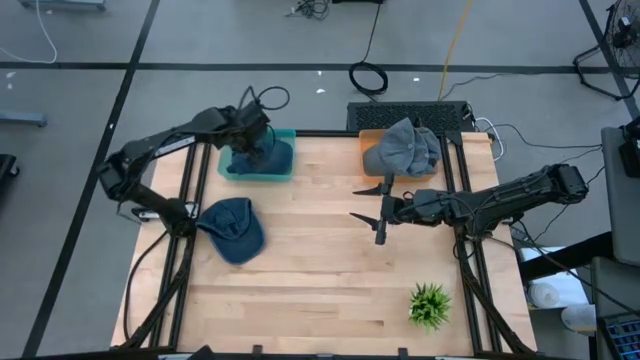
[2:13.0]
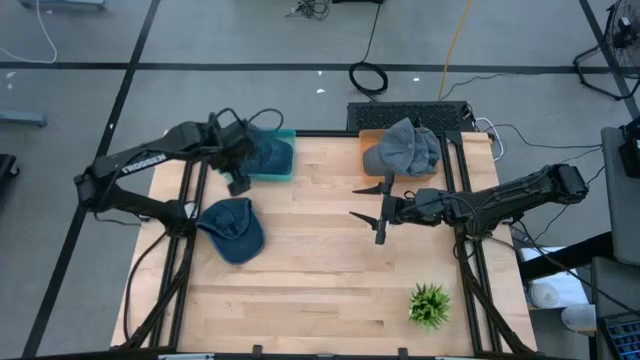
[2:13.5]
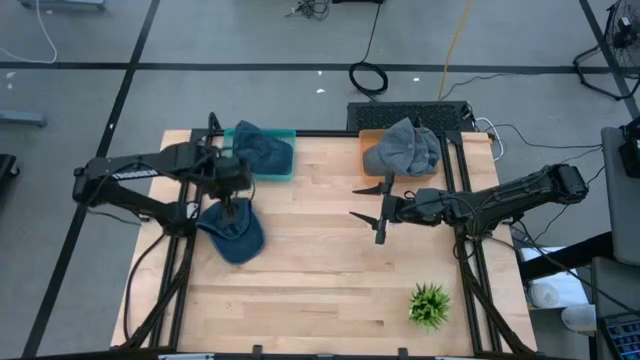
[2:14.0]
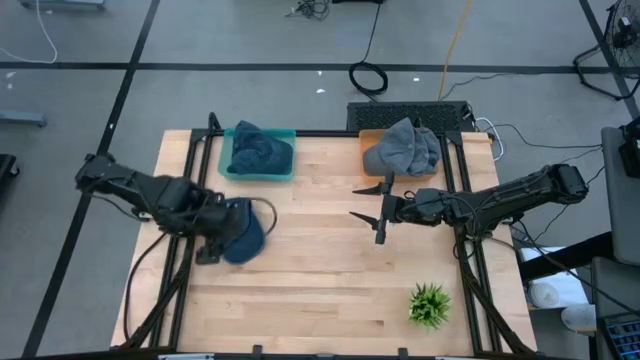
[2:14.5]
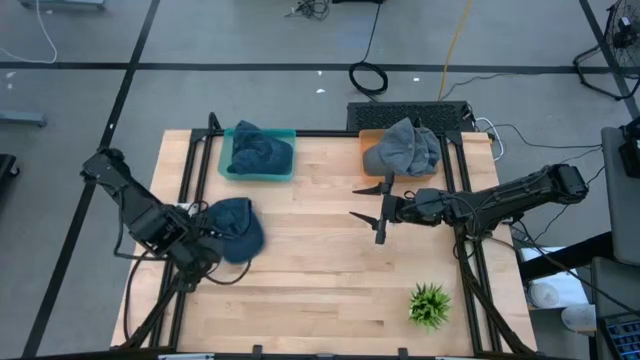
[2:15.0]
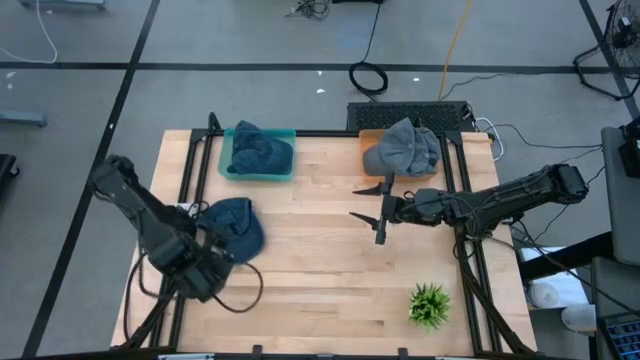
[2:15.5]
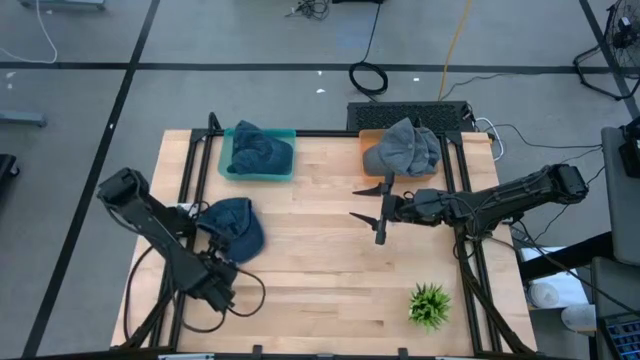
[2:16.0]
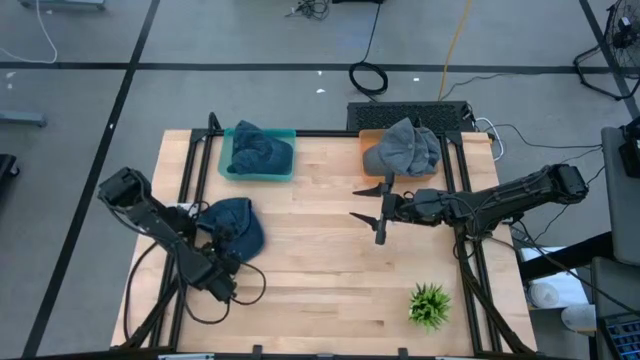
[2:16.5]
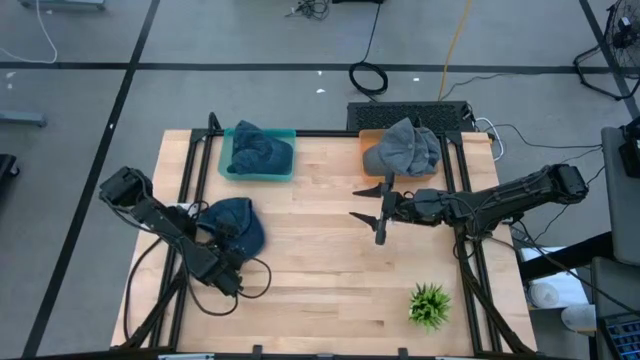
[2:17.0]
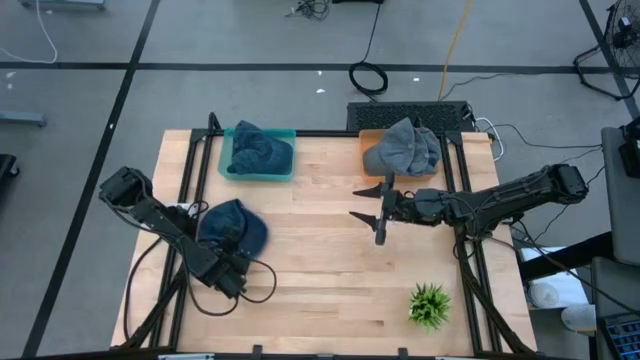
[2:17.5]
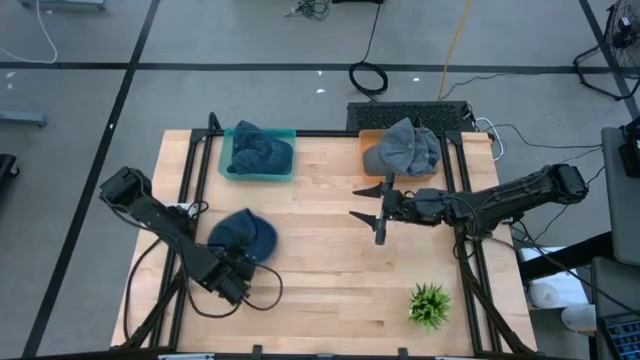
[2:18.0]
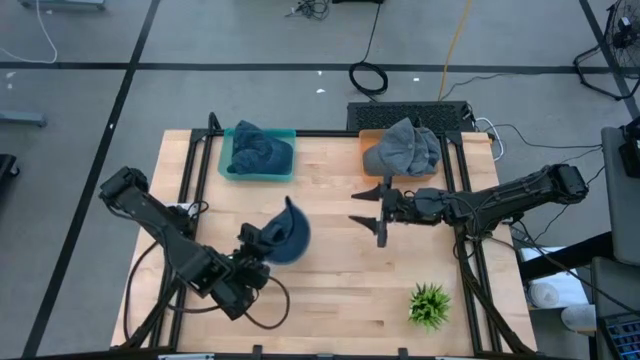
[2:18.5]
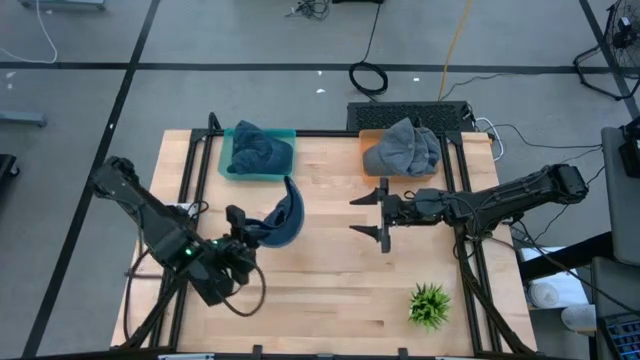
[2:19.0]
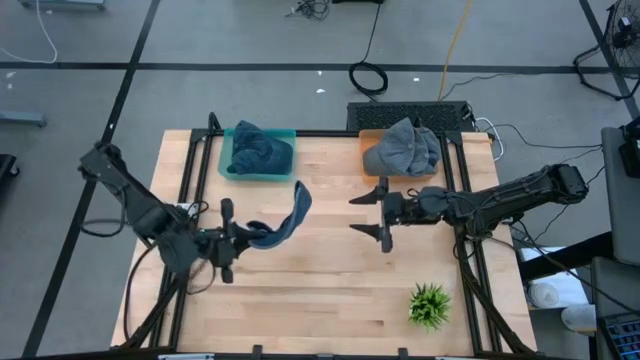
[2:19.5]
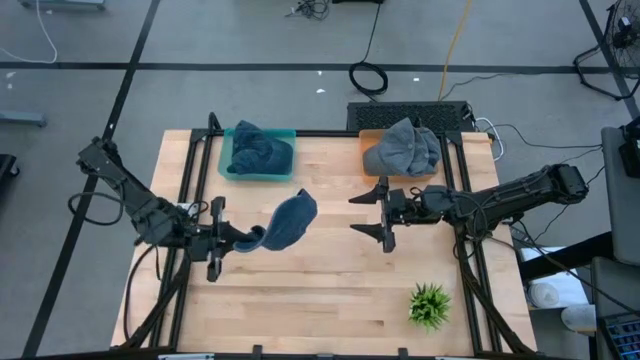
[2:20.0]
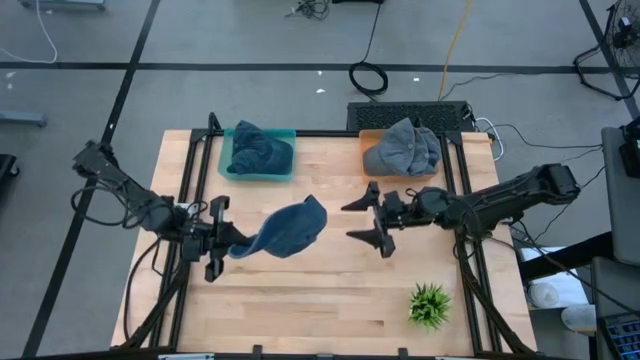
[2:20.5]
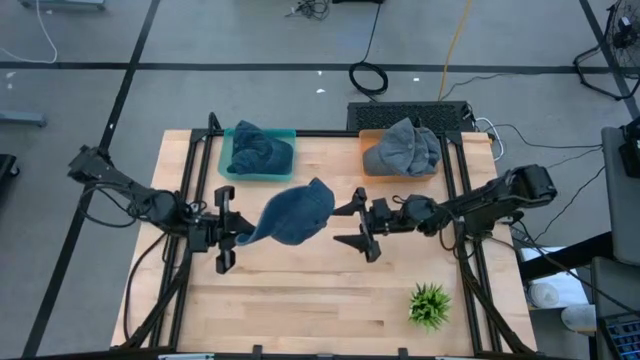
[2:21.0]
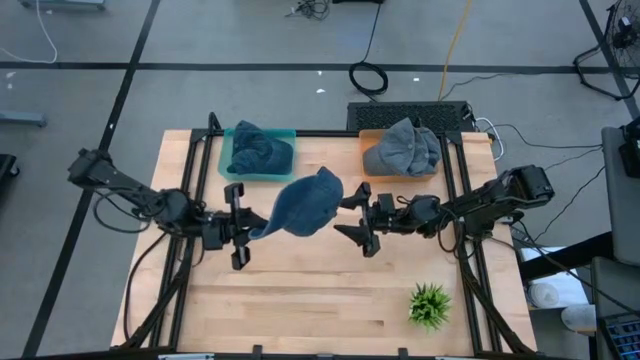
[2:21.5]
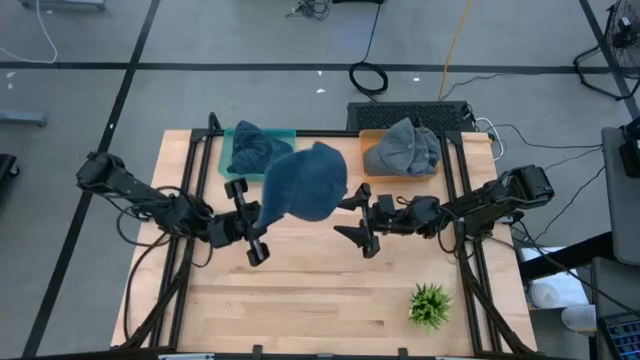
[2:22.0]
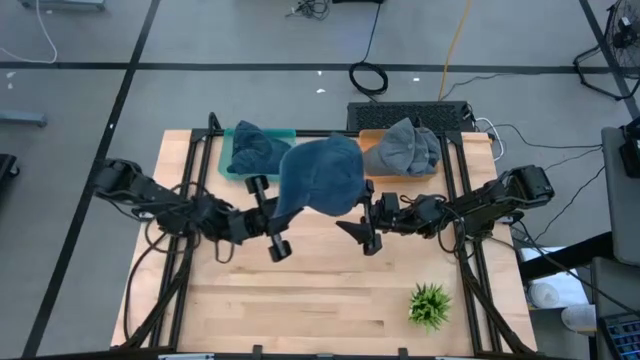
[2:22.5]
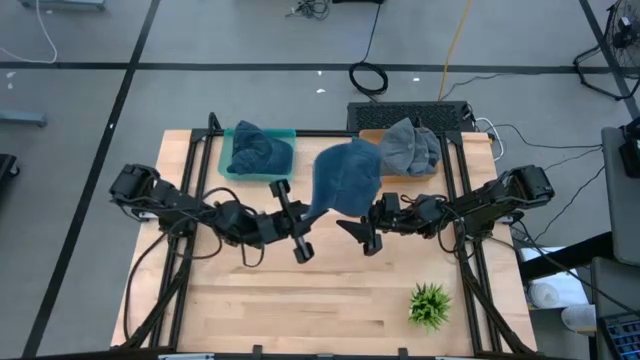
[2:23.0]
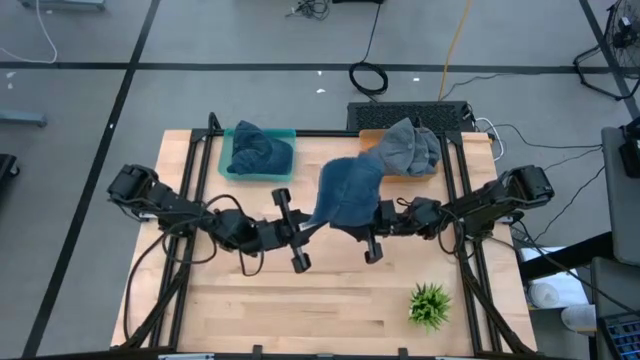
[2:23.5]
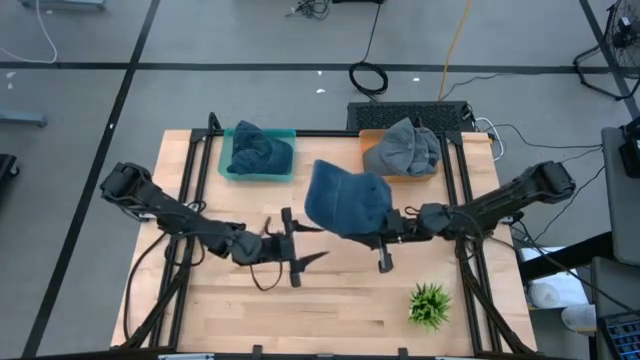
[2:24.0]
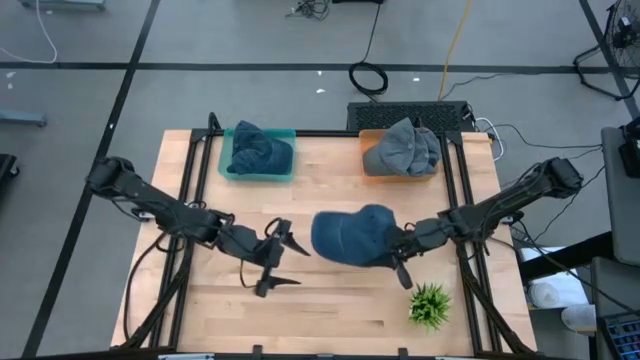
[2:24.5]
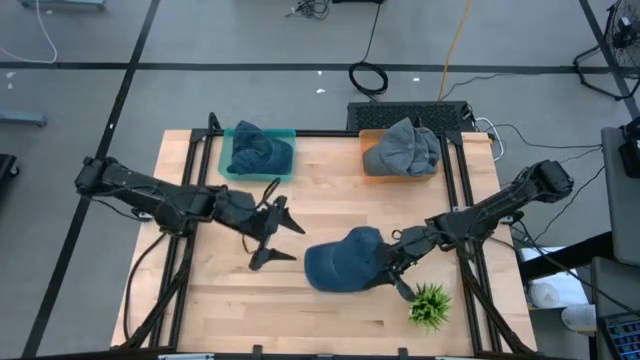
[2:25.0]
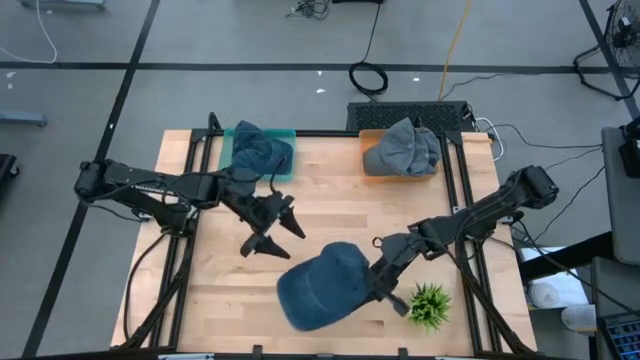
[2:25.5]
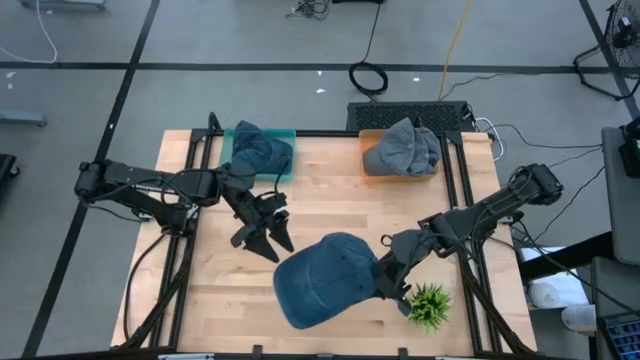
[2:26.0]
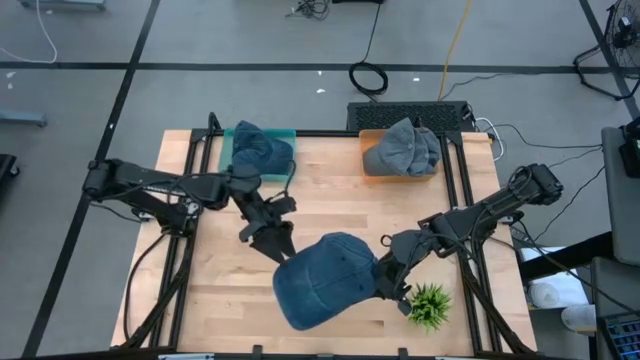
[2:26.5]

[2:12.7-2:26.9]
Task: Pick & Place hat
Put the dark blue cap into the blue bin

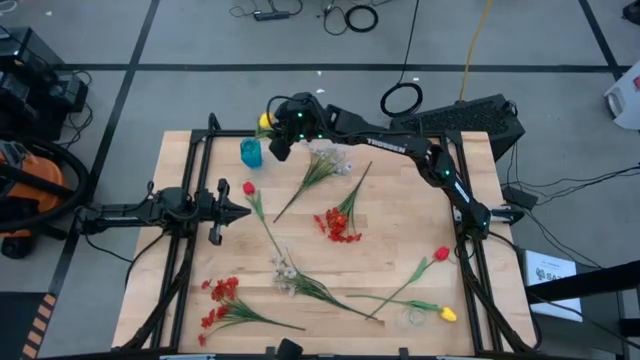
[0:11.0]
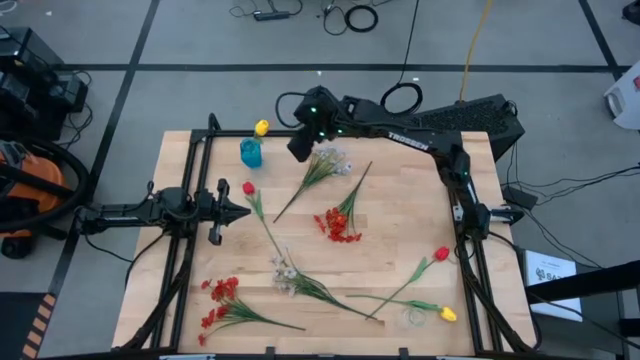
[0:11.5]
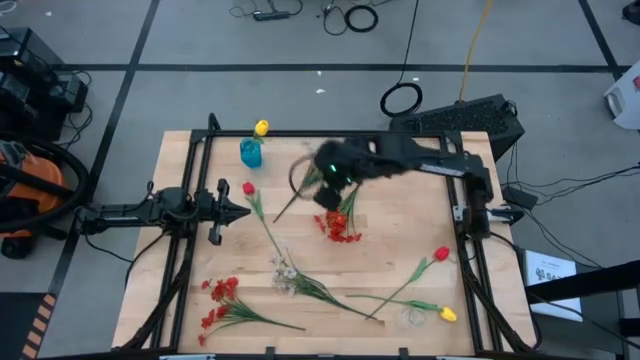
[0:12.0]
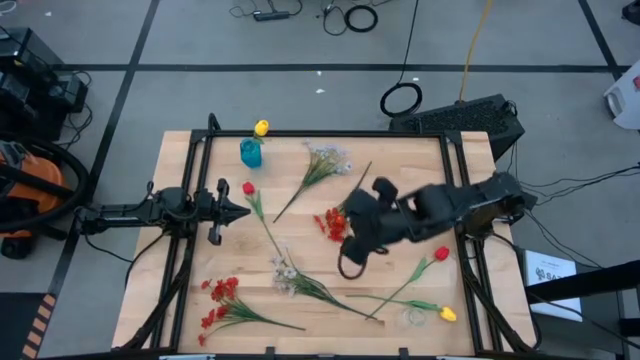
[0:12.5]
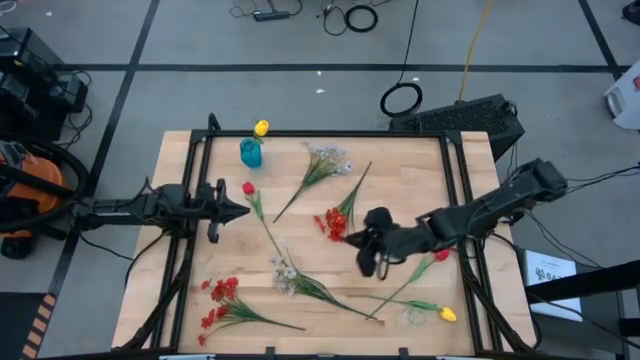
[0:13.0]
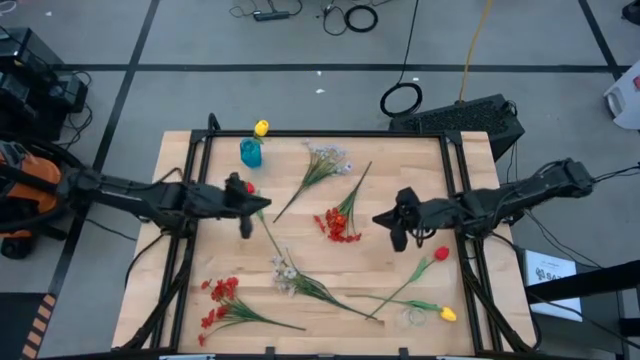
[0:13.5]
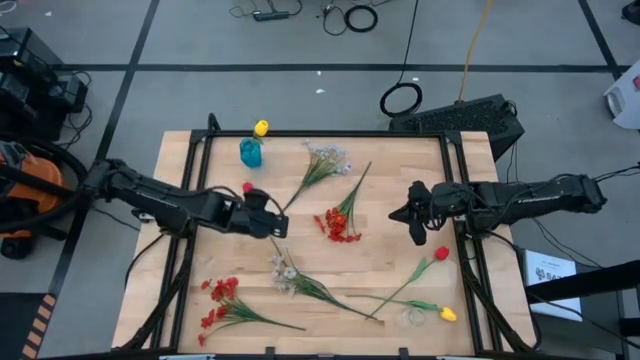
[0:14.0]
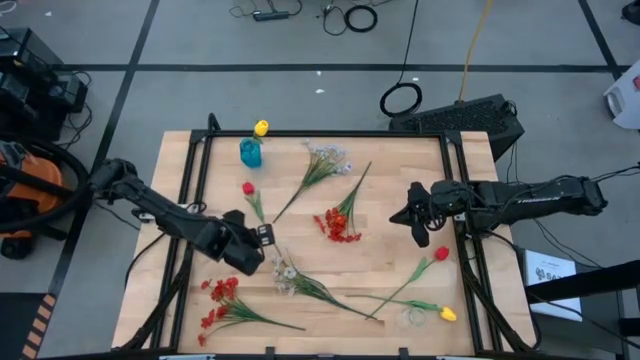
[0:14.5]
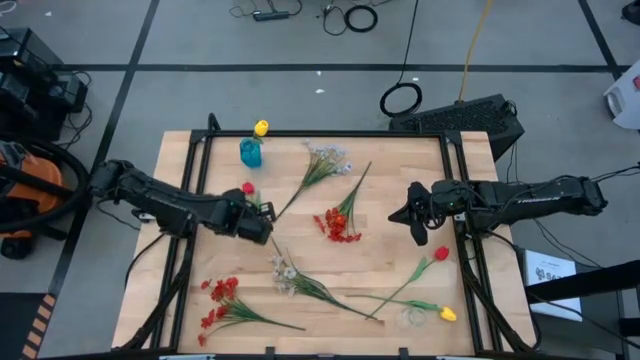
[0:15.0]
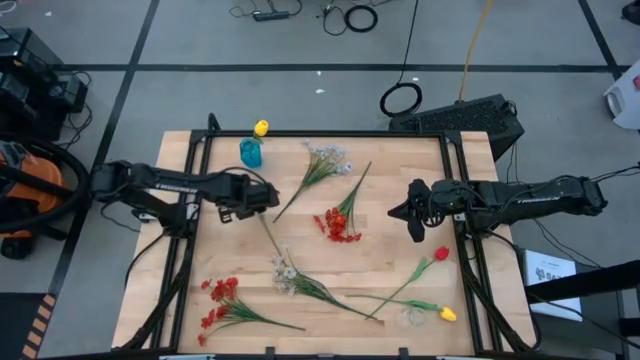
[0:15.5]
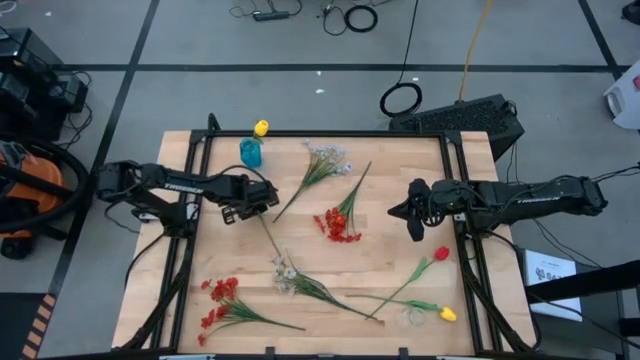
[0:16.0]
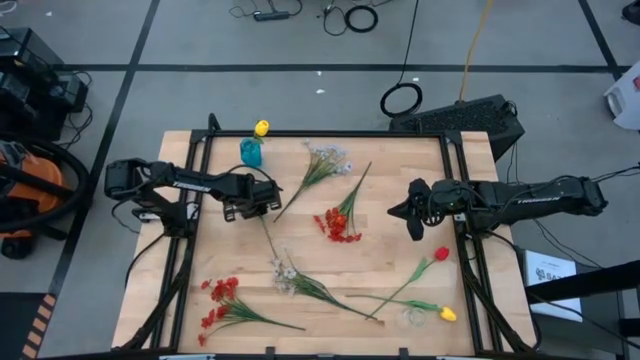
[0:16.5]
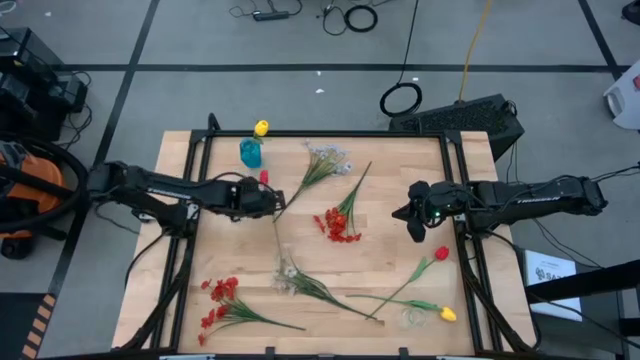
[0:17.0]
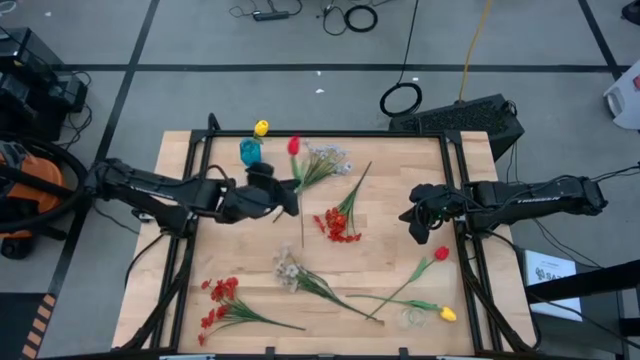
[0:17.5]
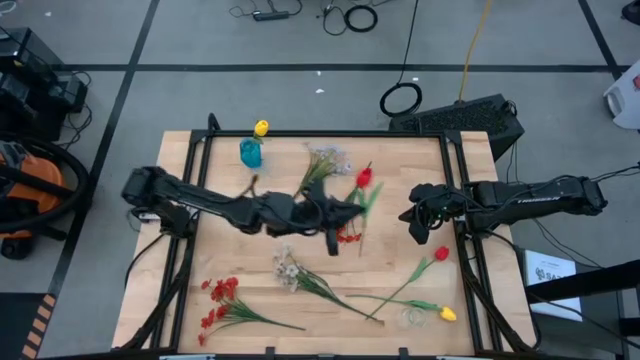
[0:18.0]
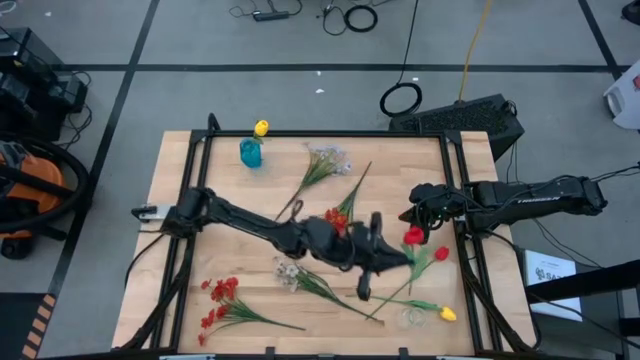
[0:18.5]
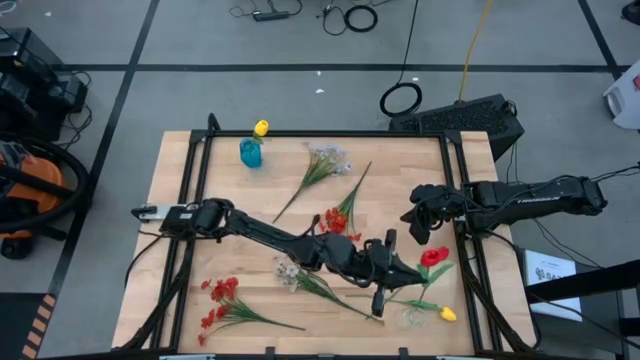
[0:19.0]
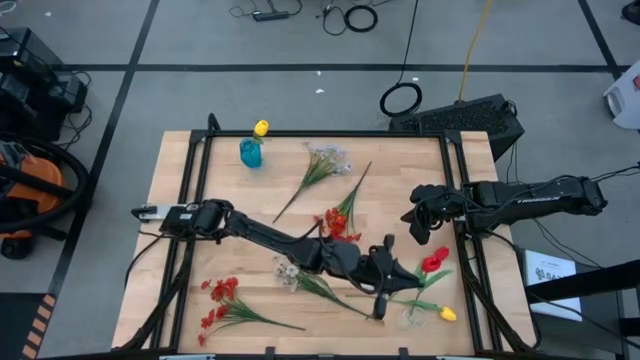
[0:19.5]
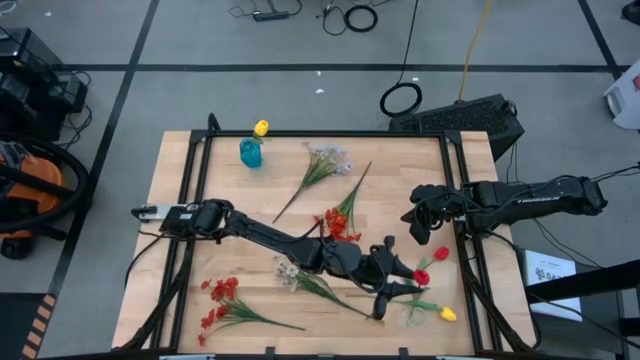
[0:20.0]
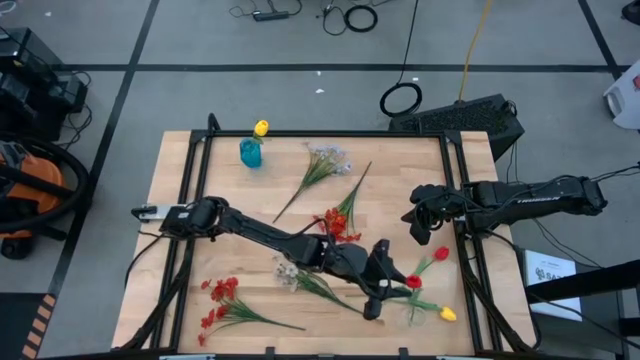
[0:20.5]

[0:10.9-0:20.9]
Task: Sort flowers into vase by color
Put the top red tulip into the transparent vase
